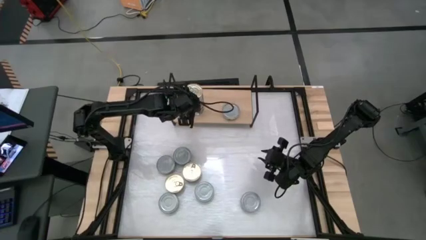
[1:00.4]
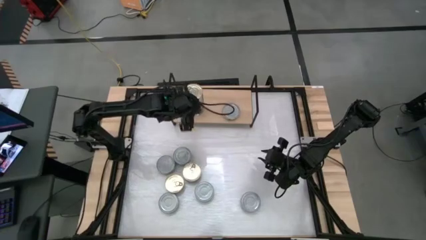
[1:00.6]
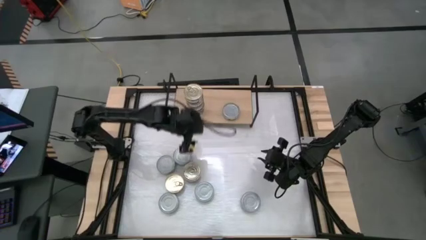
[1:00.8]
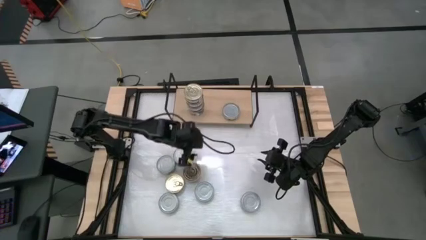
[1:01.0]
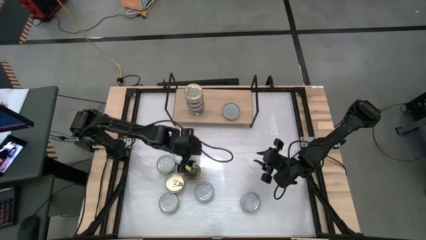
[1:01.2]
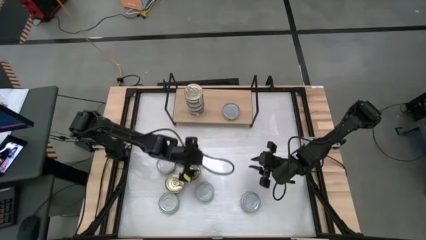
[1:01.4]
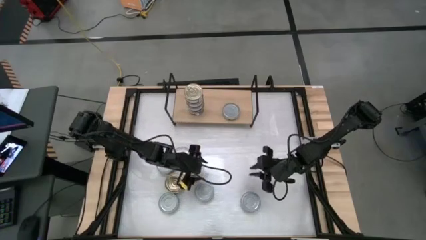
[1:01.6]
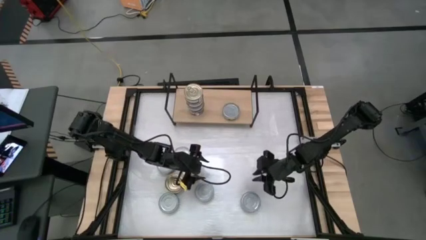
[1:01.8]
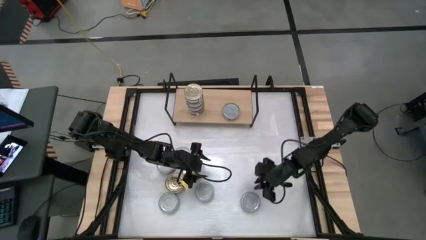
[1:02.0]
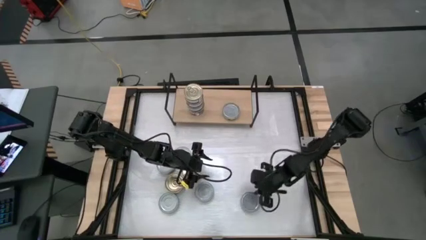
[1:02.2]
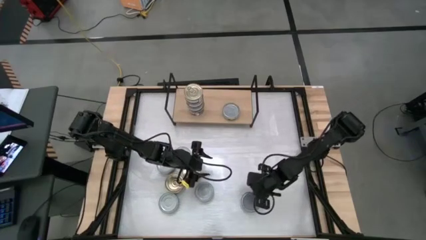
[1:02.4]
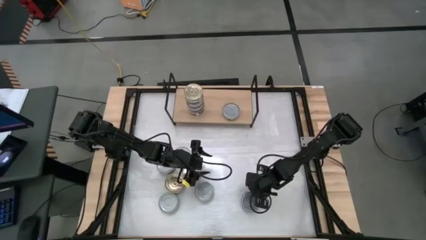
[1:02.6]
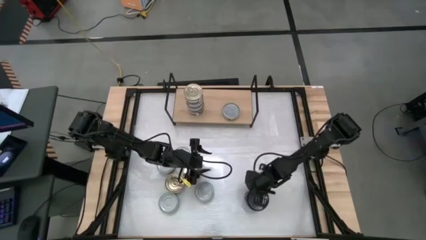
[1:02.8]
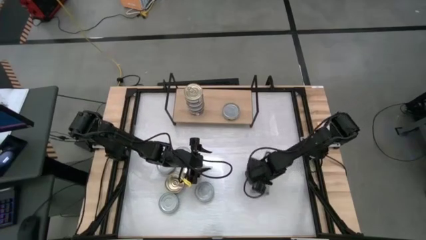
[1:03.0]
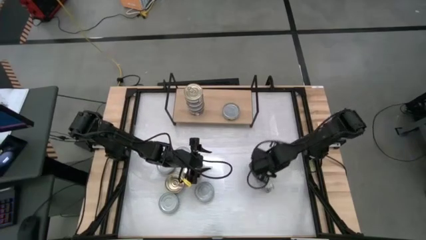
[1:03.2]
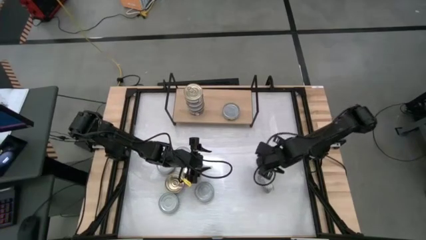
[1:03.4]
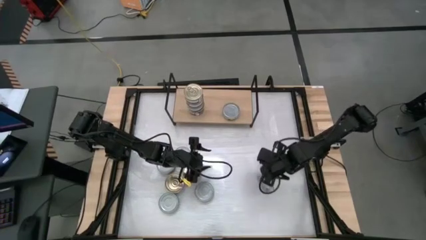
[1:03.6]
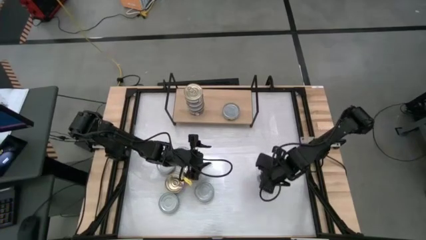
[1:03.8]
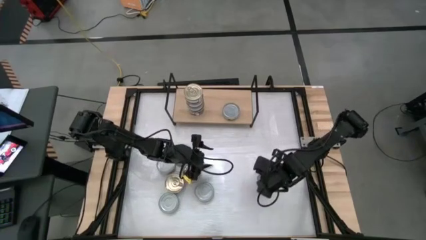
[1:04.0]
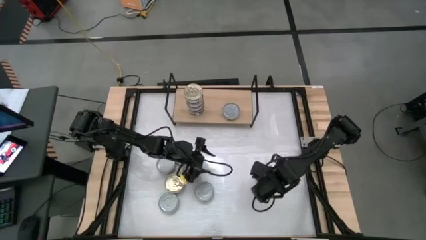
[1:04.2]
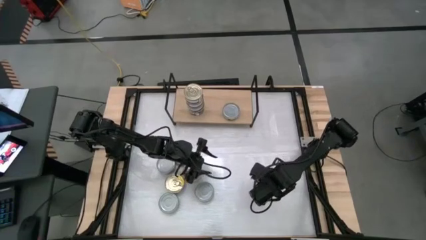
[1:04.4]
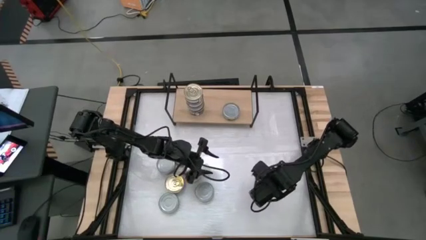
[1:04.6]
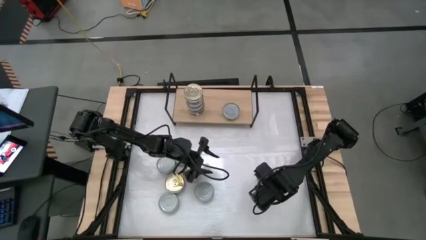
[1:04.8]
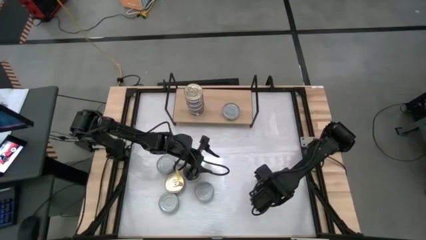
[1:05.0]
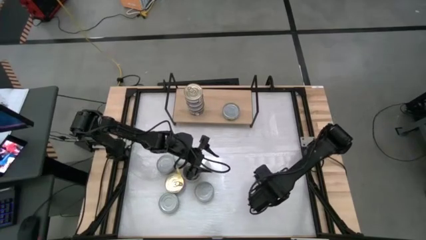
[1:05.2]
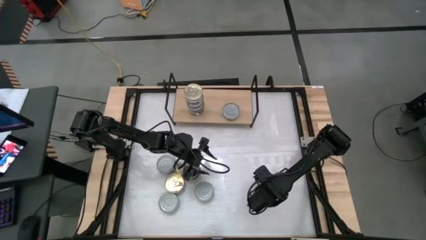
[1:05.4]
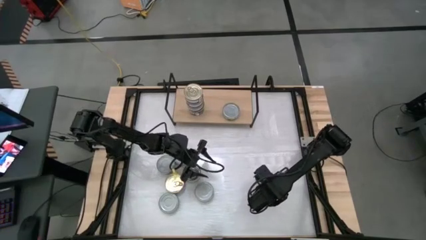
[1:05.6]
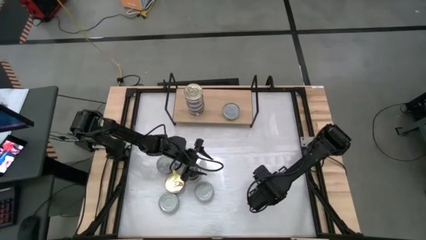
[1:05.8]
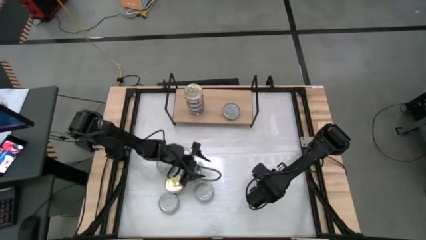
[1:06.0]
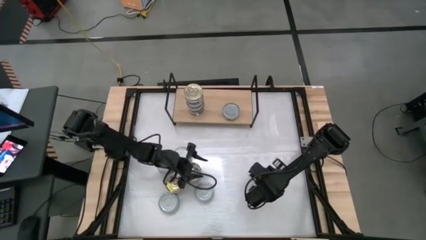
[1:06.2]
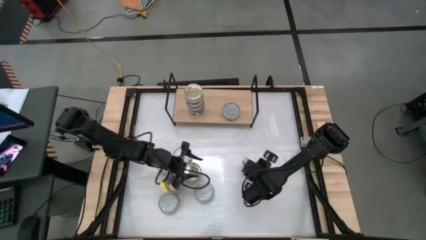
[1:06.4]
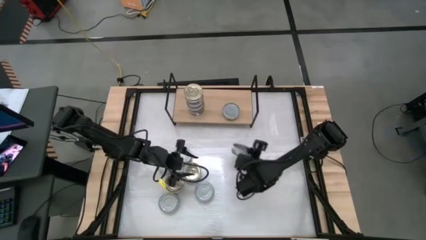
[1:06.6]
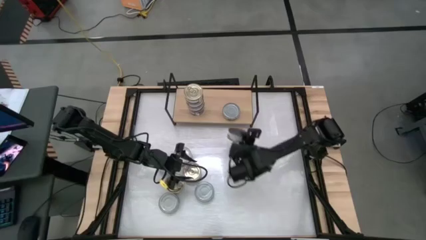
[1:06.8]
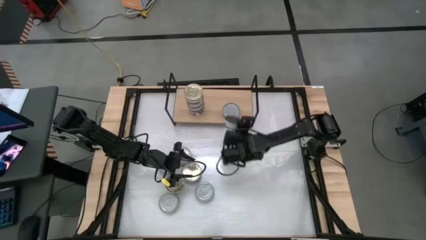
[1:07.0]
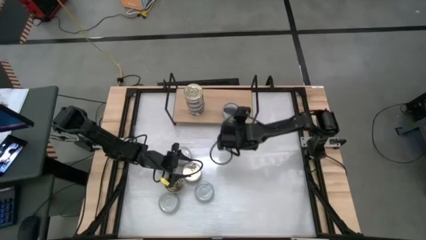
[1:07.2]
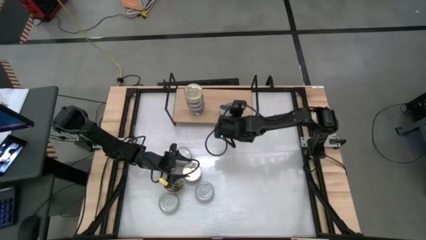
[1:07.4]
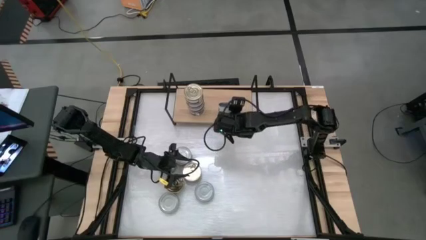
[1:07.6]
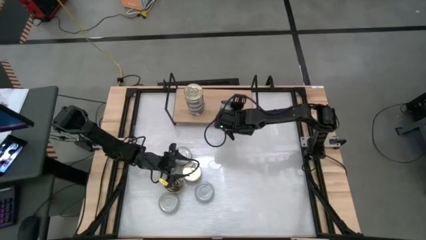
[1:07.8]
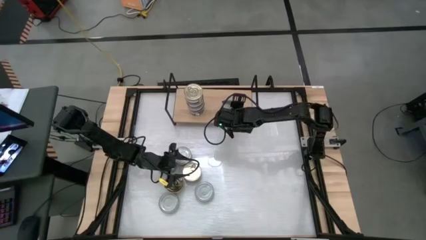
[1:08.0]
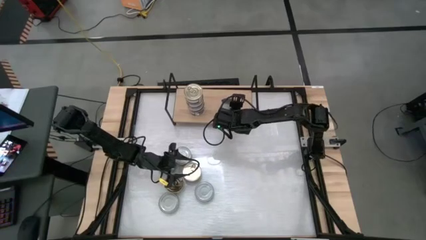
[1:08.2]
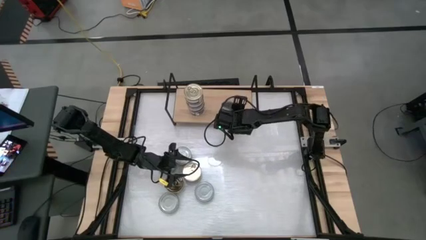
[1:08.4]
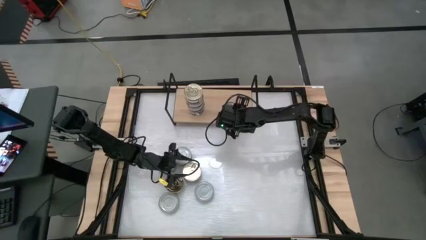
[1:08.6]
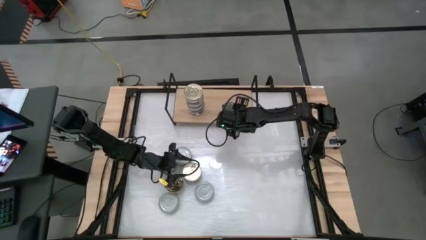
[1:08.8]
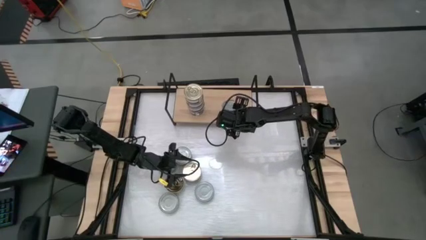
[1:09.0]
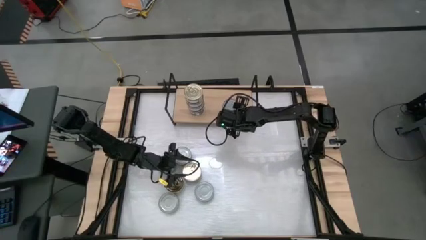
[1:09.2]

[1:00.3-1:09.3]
Task: Stack canned seafood by type on shelf
Stack the green tuna can on top of the other green tuna can on the shelf

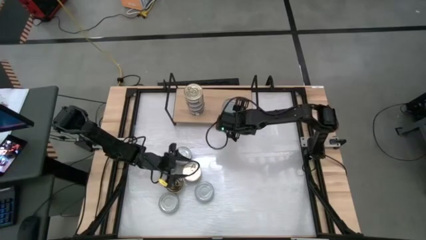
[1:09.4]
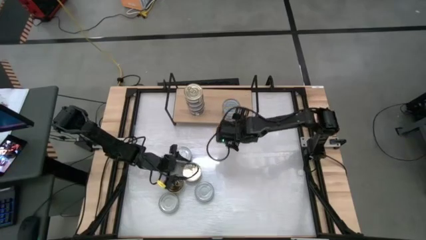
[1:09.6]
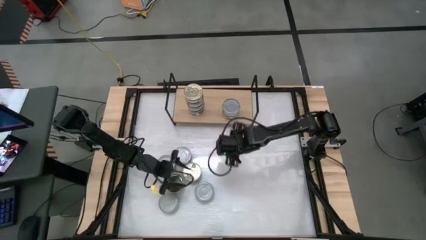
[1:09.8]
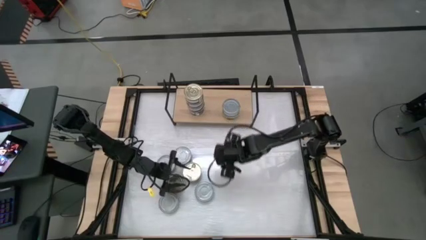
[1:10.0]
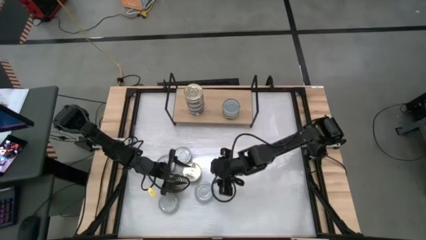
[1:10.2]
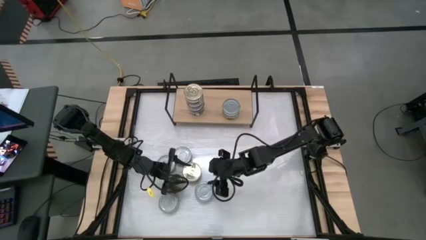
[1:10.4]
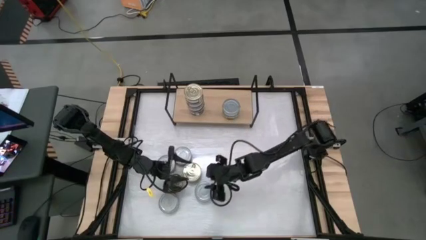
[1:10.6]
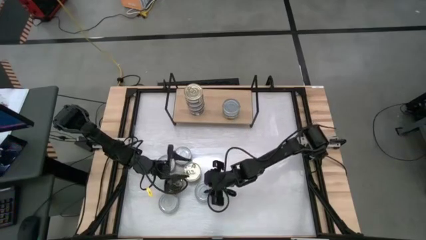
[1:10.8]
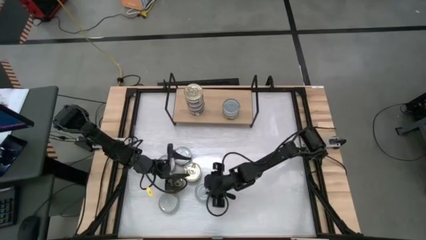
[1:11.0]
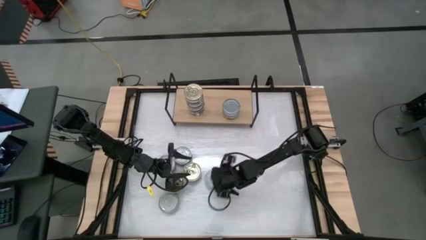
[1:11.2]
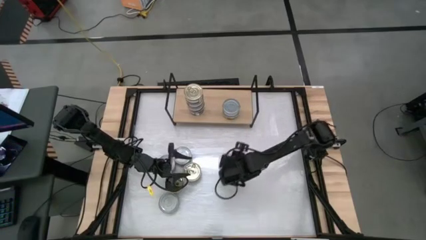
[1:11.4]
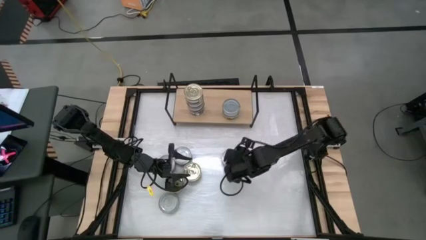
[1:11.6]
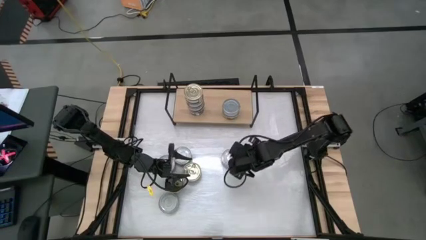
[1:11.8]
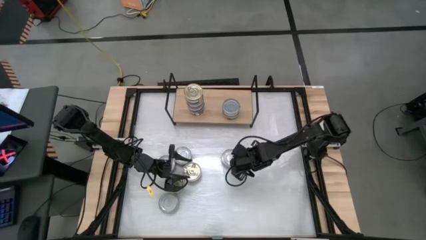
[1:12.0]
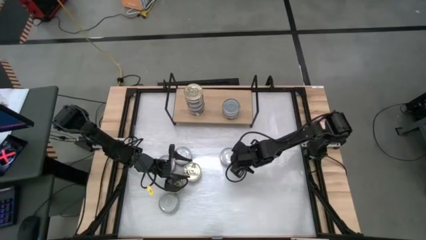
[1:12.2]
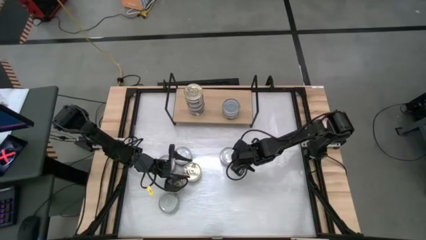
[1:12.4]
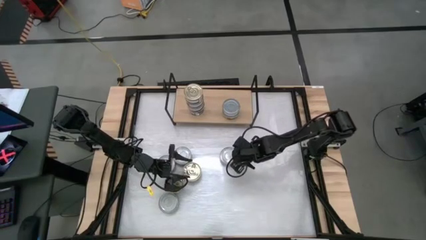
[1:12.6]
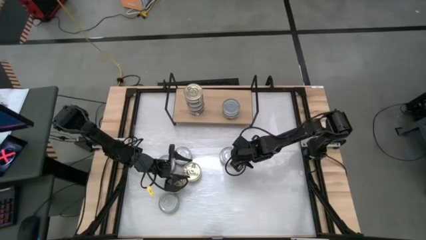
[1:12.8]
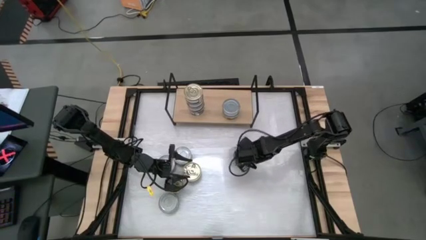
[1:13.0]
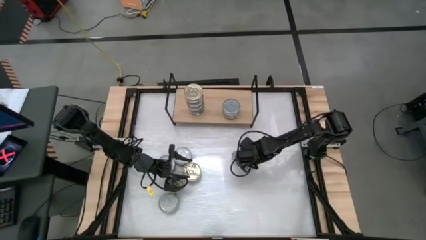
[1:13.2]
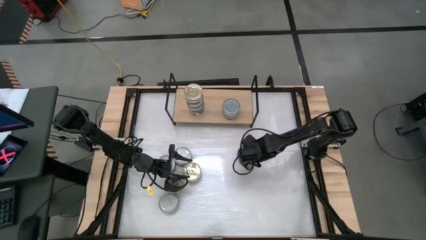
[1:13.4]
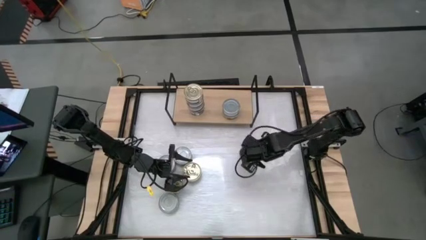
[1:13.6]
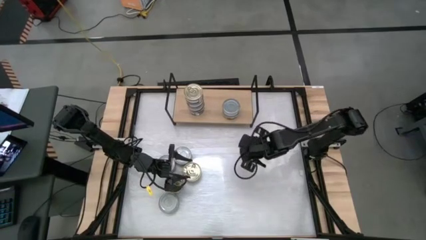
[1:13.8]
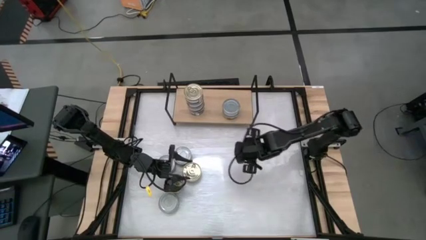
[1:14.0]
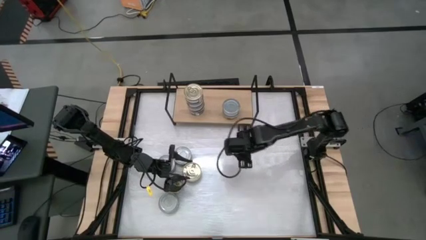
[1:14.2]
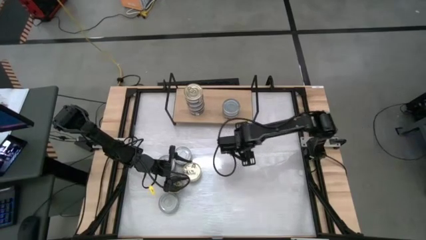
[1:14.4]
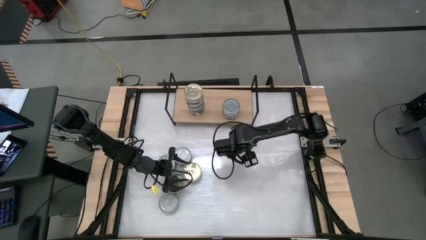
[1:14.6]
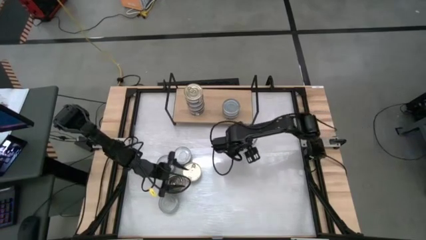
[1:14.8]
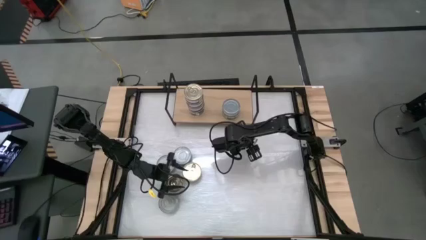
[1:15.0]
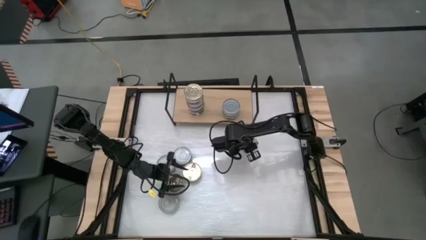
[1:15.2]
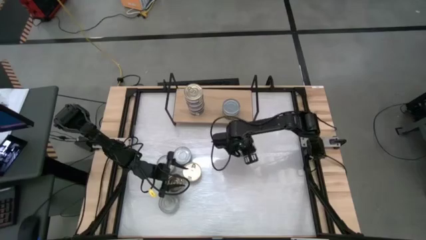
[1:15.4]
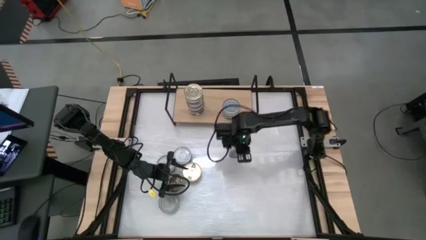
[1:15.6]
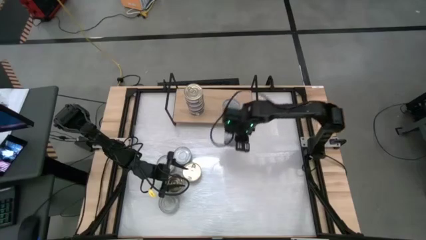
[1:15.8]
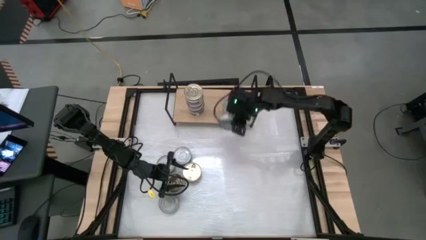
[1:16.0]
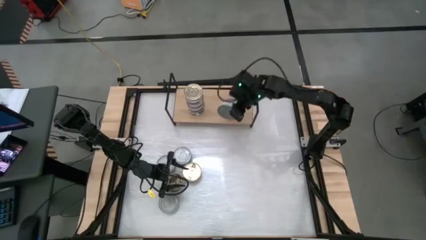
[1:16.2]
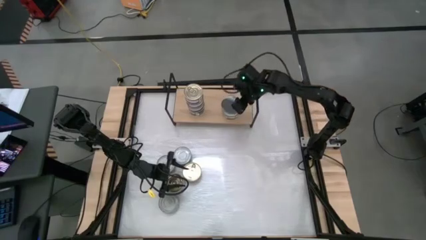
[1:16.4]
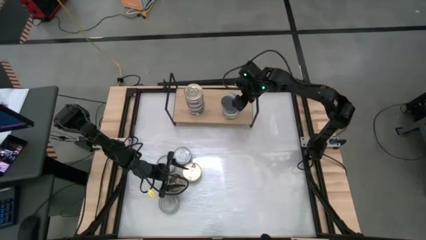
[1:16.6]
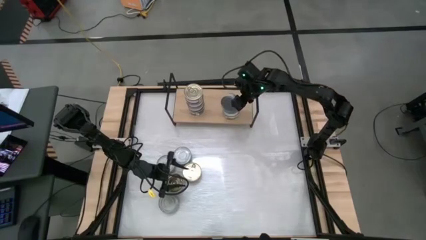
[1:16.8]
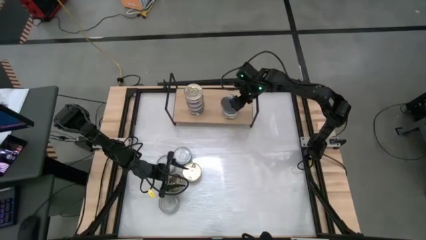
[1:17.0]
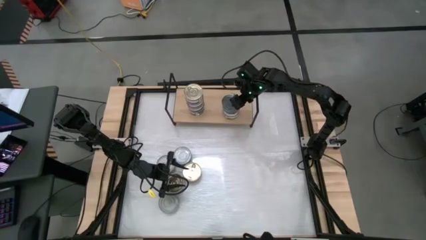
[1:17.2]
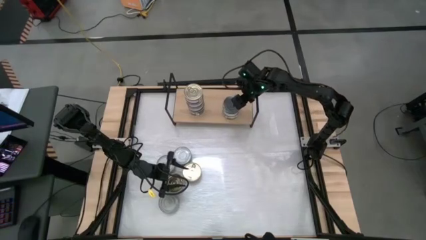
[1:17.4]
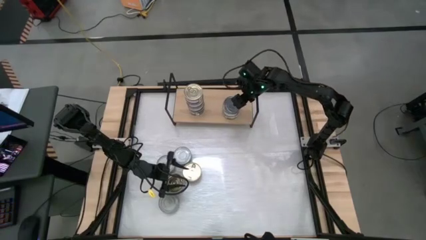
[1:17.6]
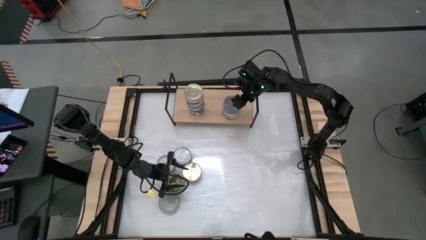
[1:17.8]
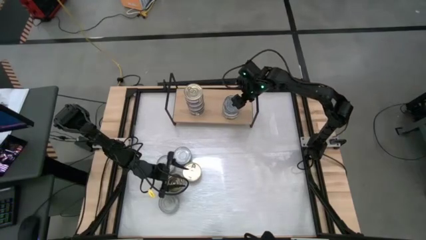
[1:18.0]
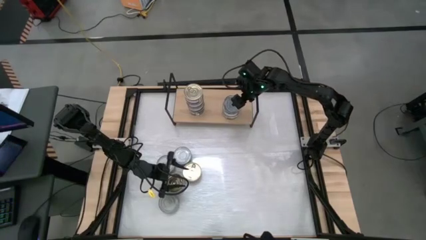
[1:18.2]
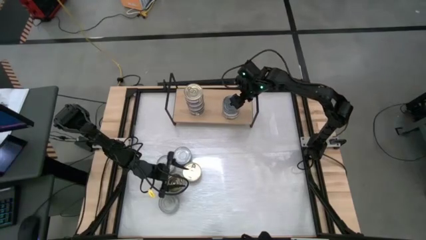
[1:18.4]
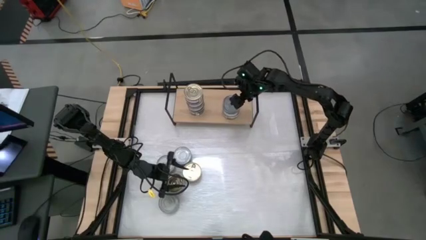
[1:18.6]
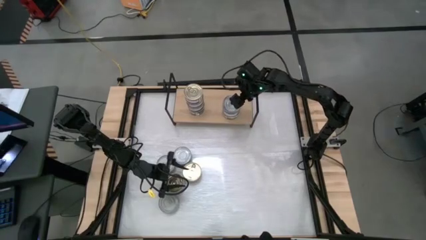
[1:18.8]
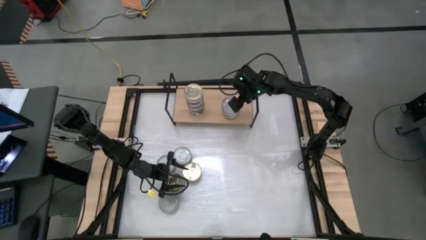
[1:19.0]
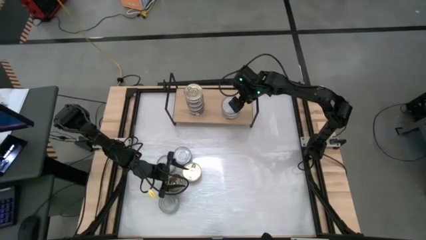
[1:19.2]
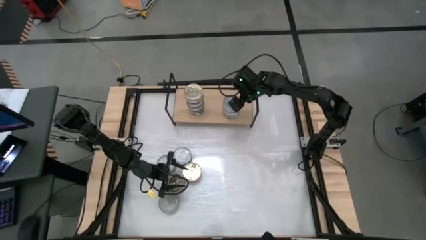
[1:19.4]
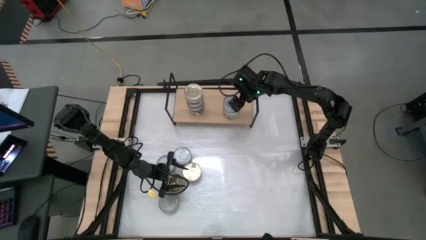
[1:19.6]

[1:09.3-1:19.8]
Stack the green tuna can on top of the other green tuna can on the shelf
